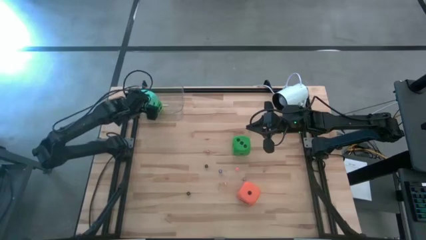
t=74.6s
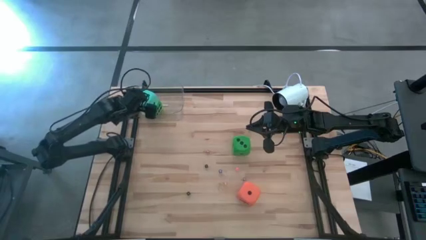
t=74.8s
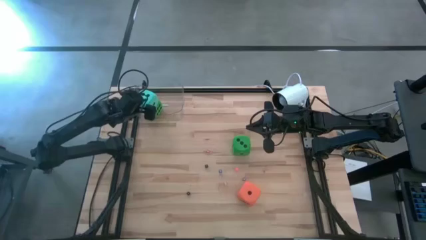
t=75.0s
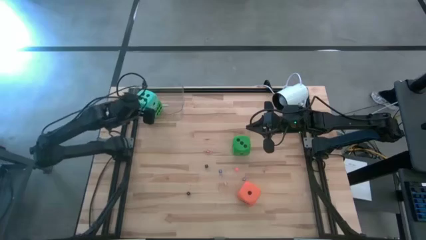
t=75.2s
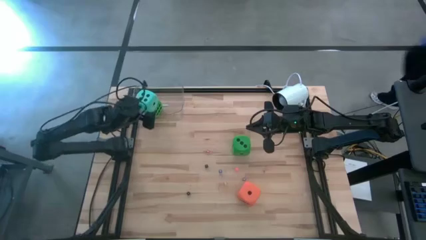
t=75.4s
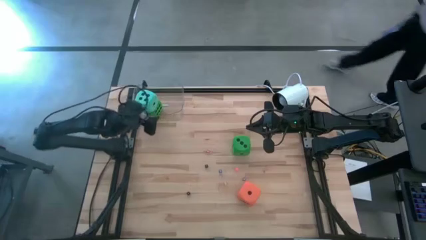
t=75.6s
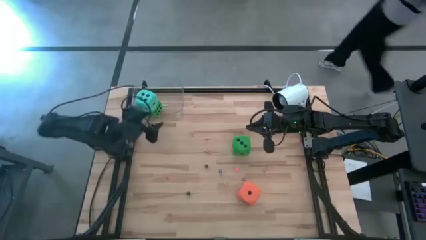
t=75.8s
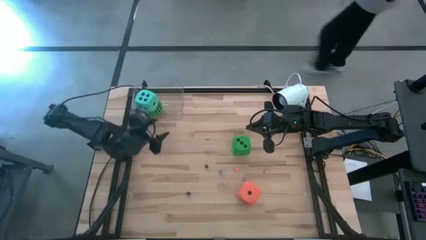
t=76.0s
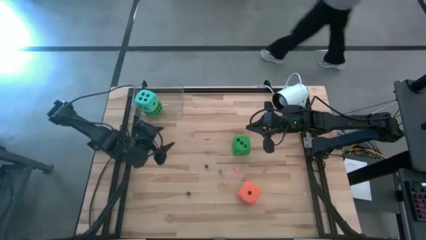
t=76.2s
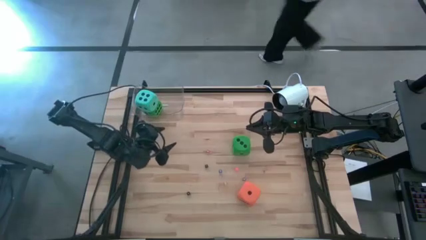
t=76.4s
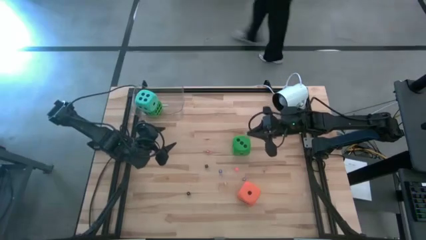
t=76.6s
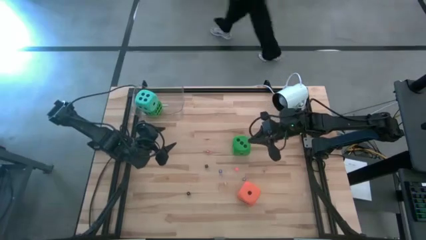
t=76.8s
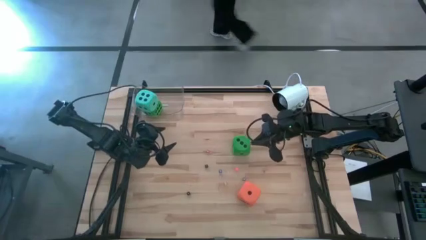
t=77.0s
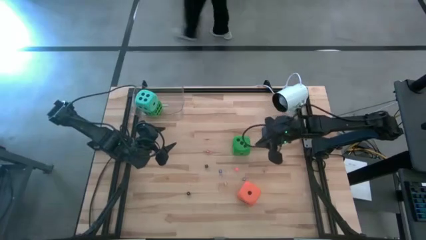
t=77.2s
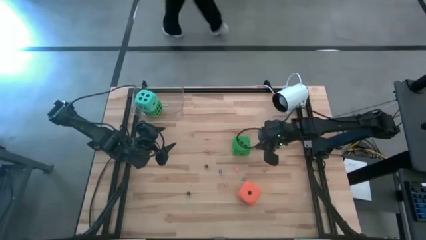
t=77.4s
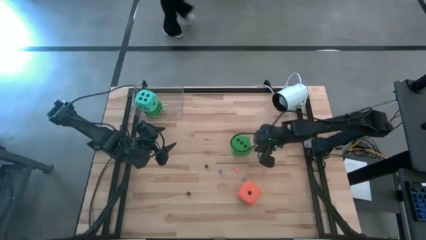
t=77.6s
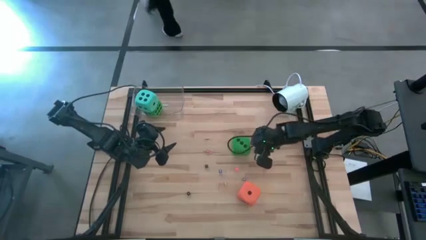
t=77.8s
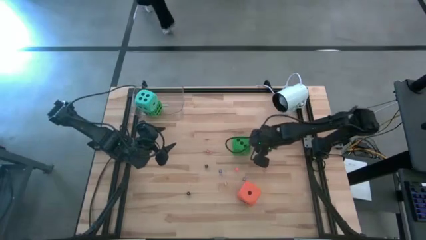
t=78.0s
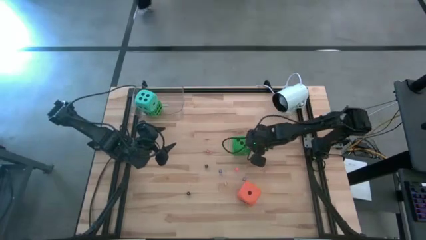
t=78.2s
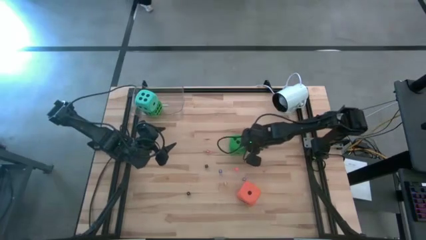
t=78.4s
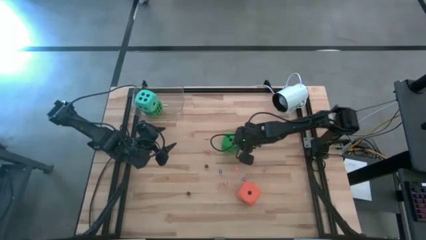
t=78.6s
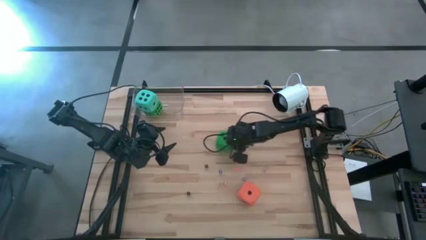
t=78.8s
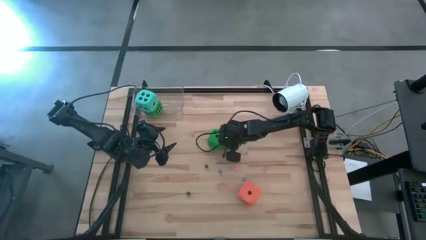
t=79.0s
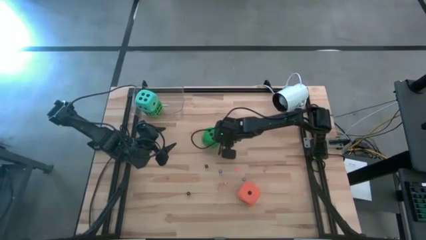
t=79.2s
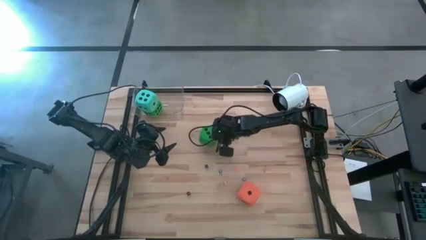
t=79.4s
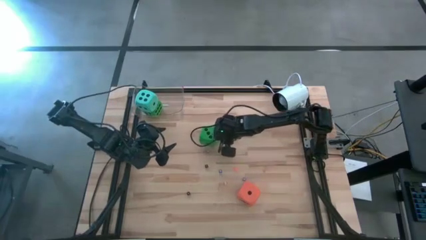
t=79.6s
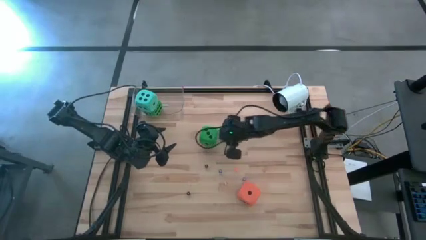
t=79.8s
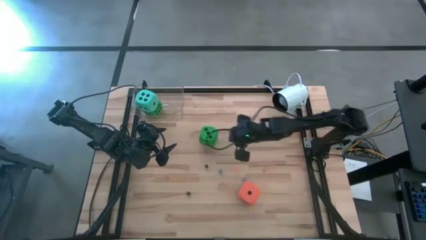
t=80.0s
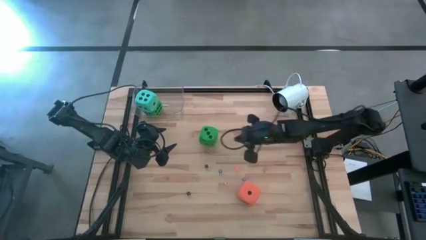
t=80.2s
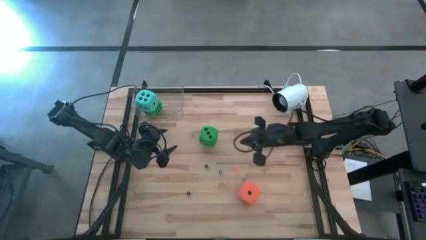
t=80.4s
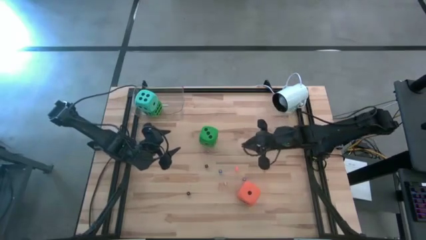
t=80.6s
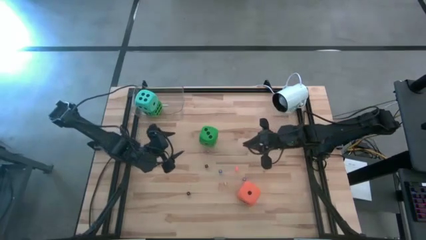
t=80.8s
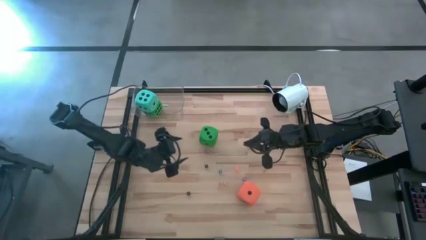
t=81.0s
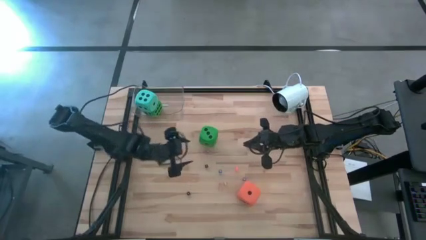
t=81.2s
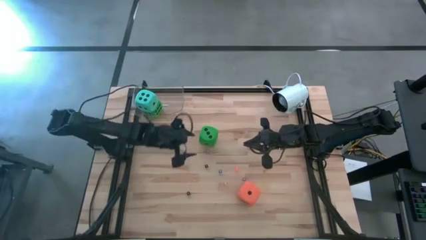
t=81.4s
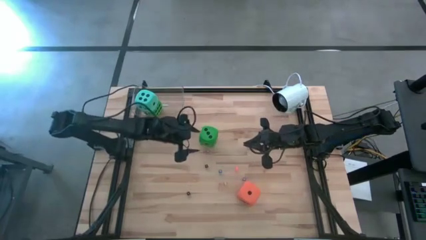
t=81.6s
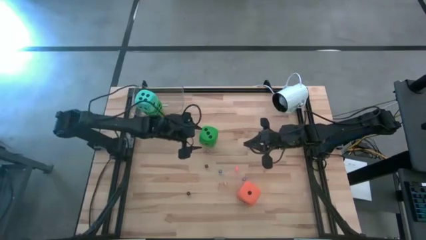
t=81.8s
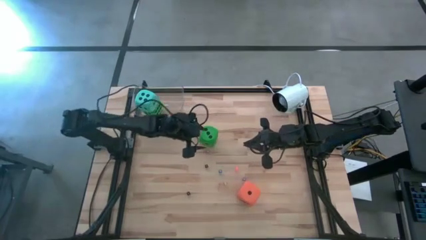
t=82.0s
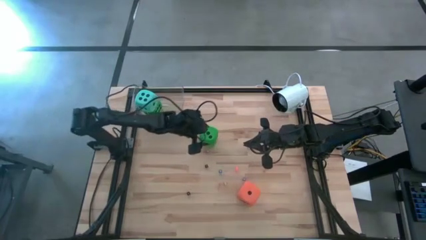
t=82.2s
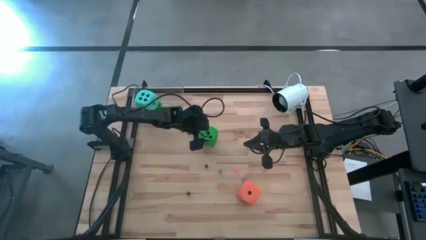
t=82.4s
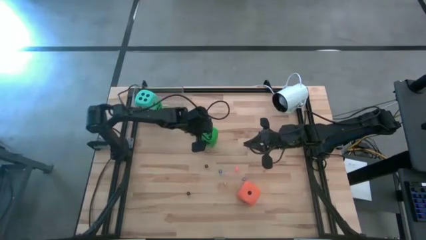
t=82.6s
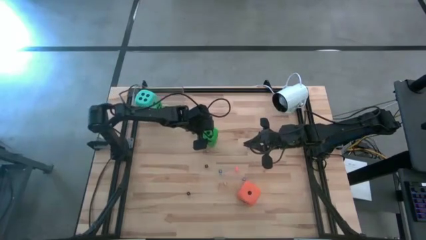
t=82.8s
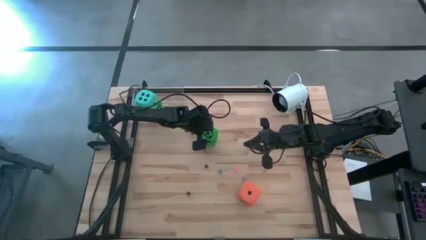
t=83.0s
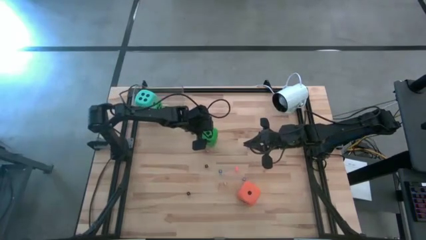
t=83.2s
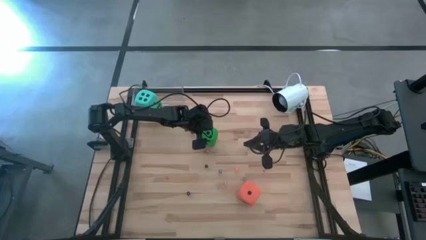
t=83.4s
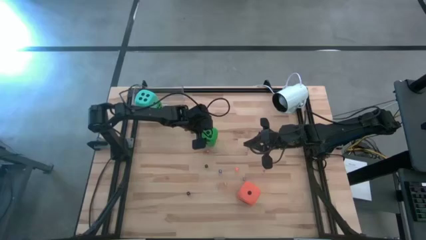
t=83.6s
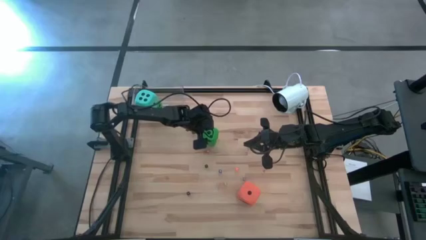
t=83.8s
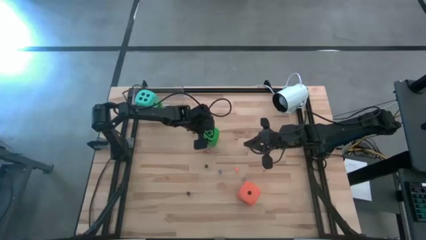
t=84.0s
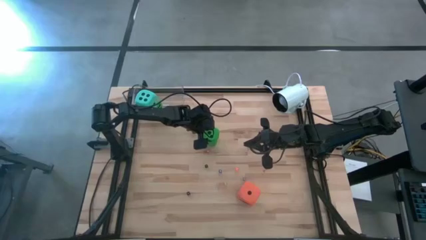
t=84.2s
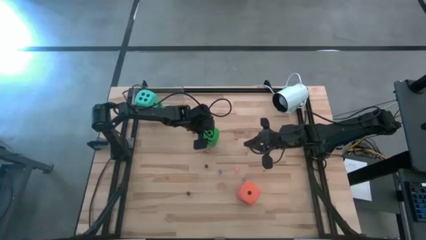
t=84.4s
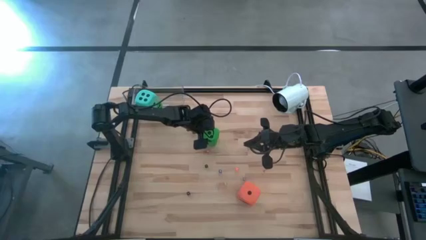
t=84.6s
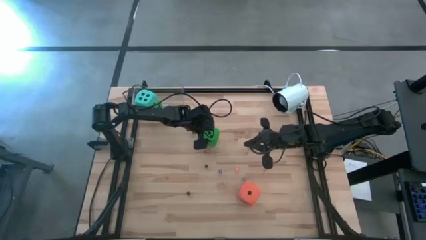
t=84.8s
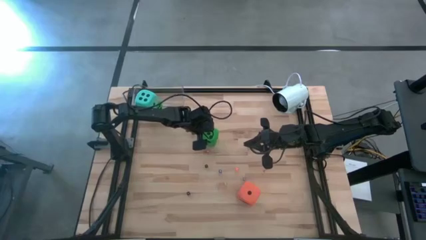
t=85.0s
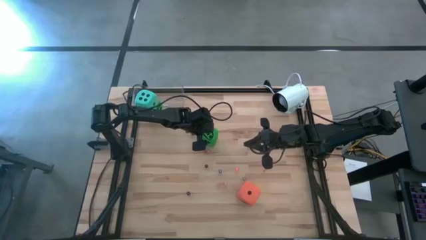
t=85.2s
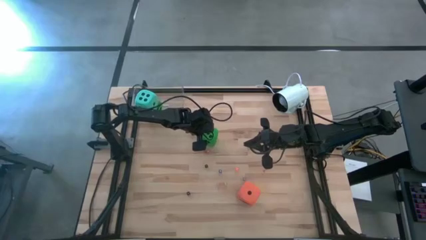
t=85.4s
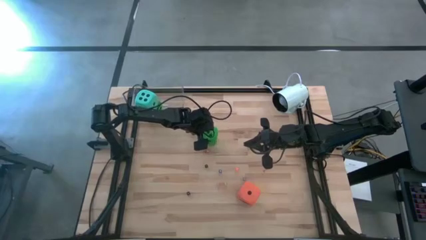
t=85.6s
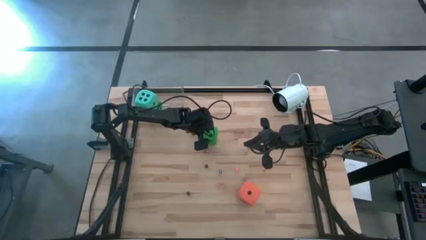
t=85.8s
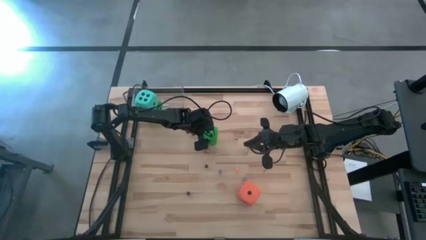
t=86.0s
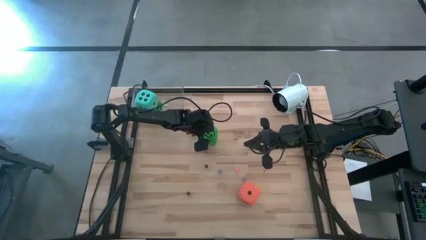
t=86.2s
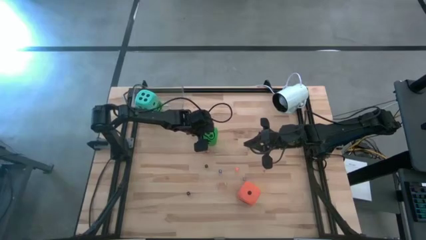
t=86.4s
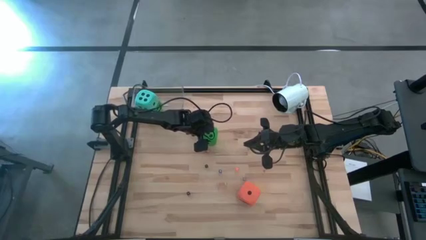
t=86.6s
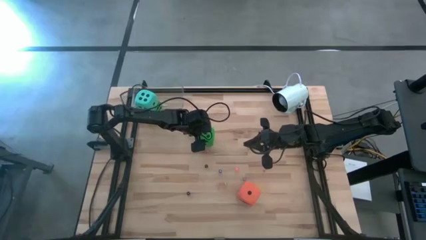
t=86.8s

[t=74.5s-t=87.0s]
Task: Pick & Place Dice
Put the large green die into the transparent bin

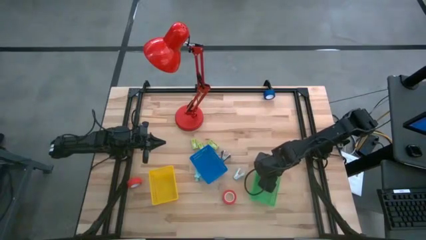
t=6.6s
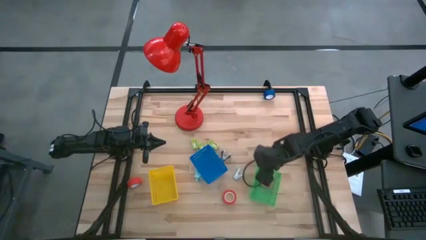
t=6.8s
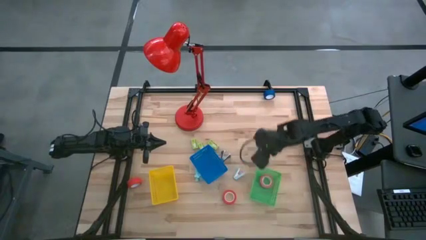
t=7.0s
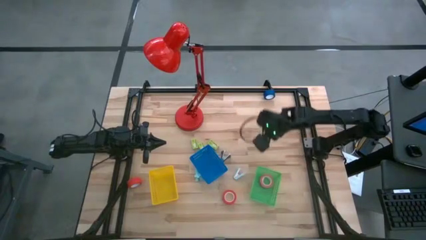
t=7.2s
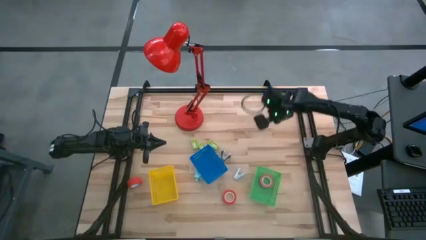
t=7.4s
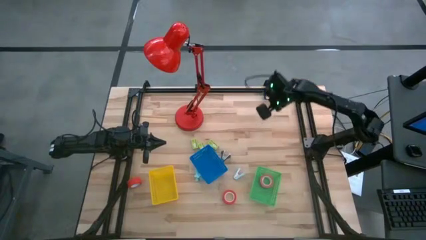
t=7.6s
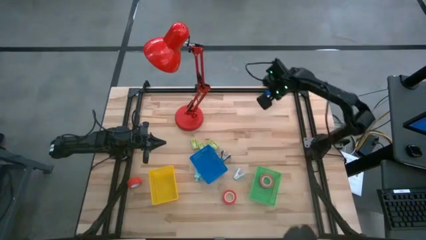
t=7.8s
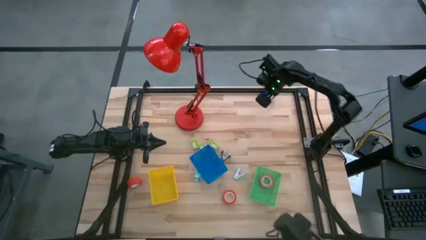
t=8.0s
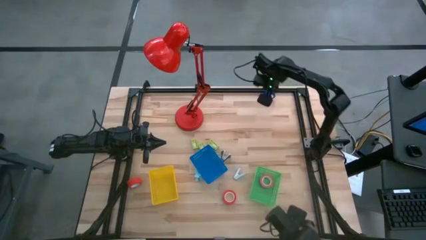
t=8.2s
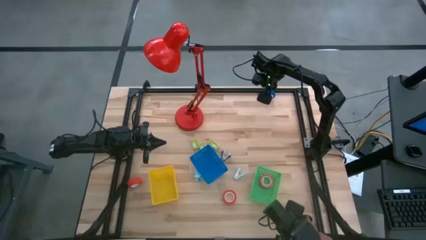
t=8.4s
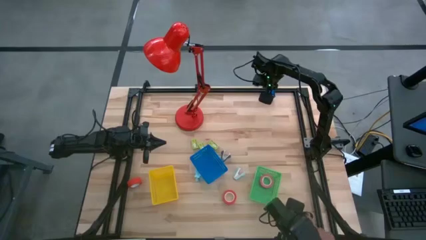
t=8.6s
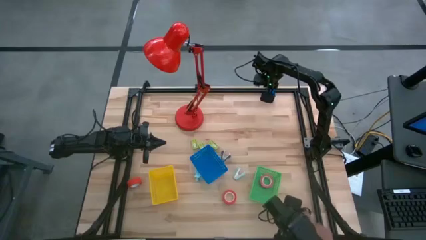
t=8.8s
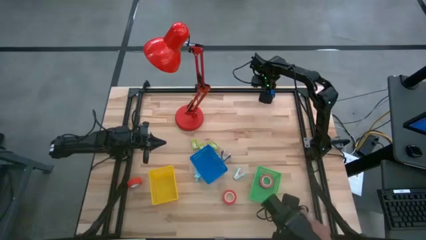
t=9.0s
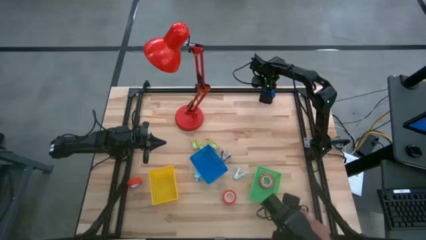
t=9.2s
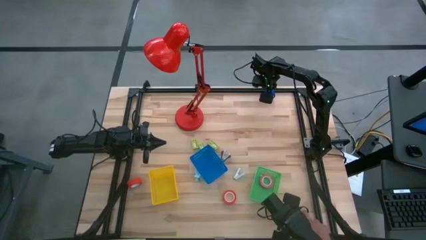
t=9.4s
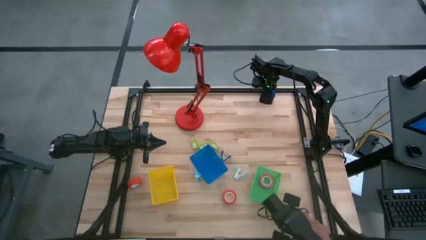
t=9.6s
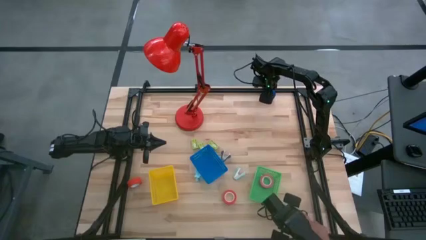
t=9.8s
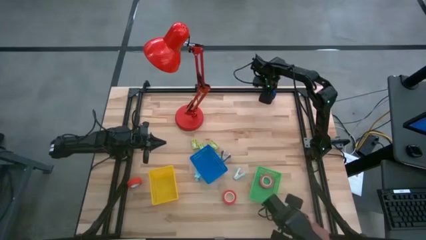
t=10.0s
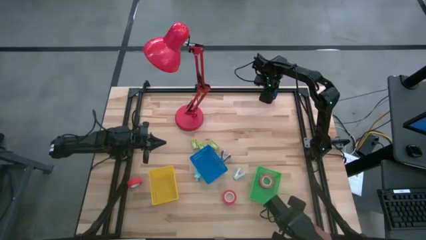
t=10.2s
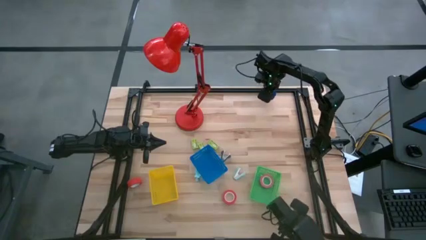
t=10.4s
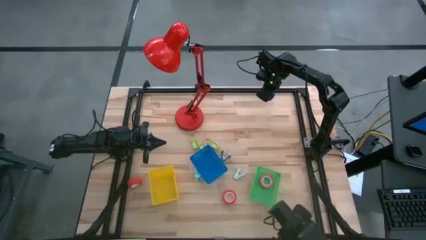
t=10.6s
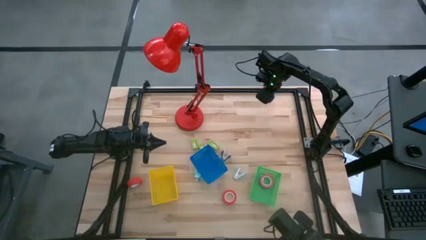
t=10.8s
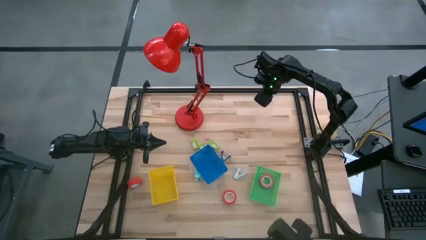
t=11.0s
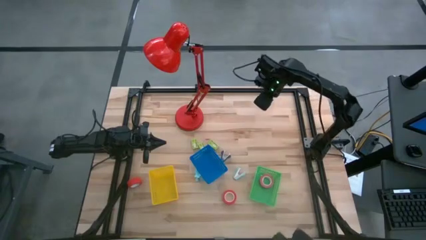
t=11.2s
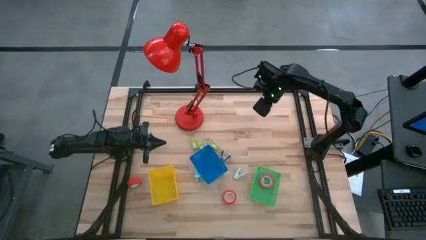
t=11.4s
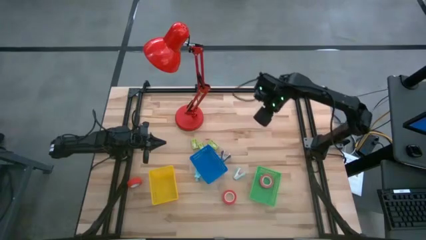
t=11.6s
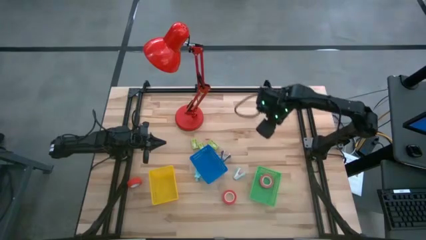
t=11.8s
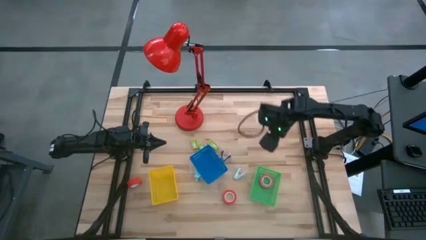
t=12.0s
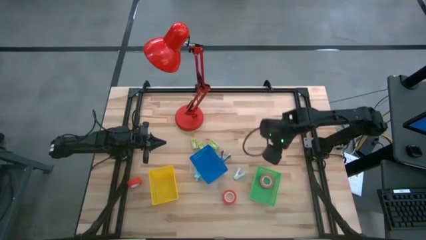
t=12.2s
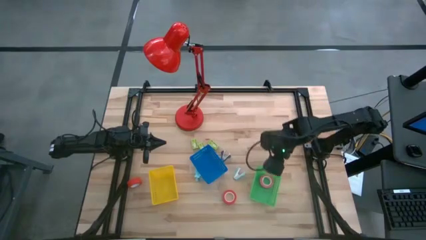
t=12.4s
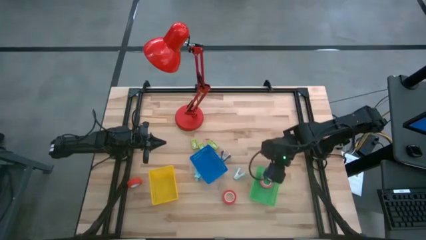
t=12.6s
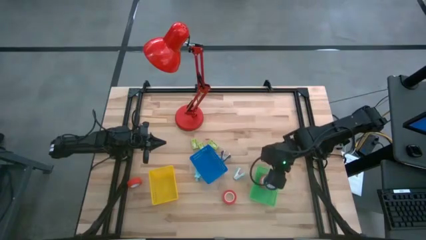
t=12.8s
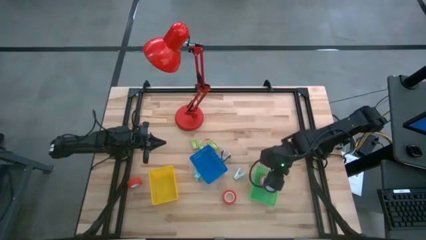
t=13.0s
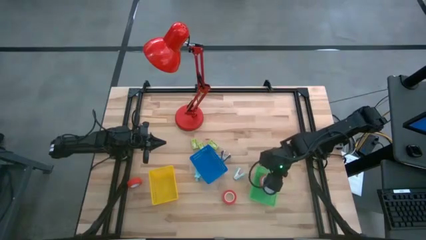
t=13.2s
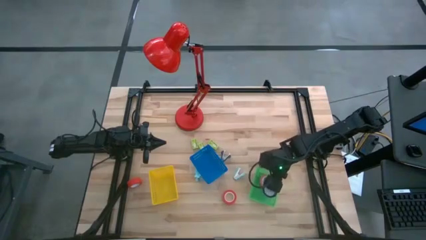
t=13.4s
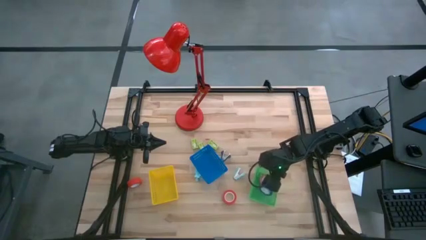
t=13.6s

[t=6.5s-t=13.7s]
Task: Pick and place Stapler, Stapler remover, tape
Put the blue tape into the green bin
